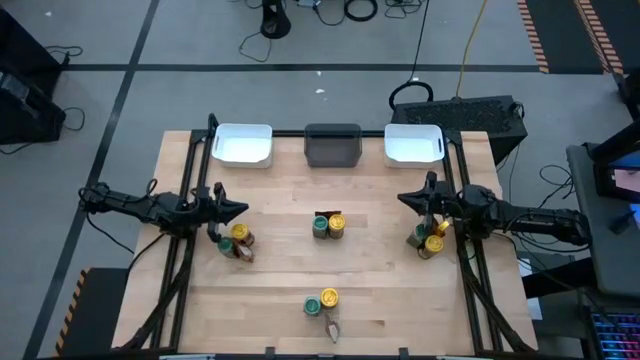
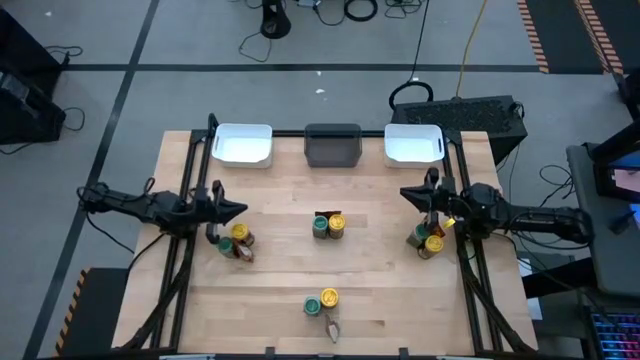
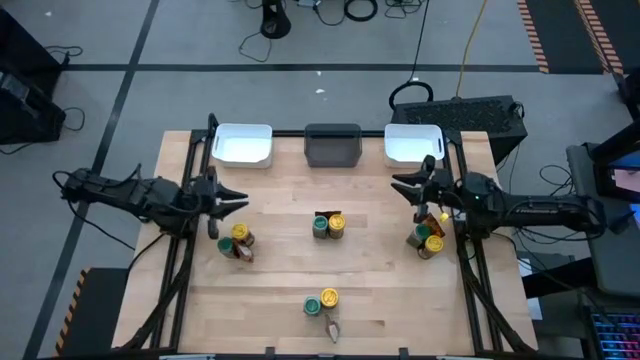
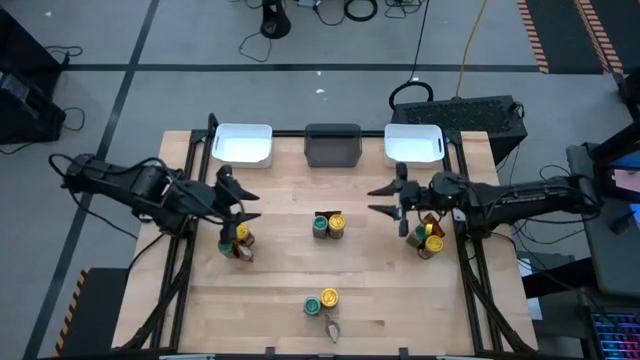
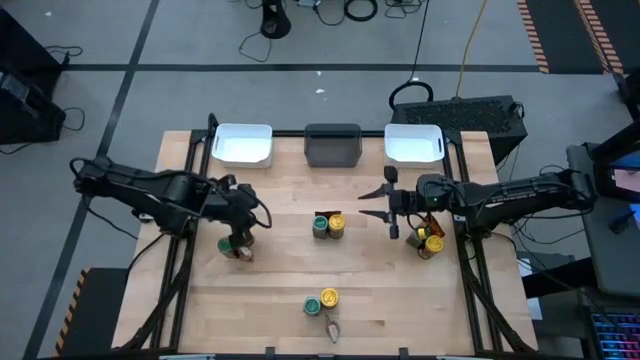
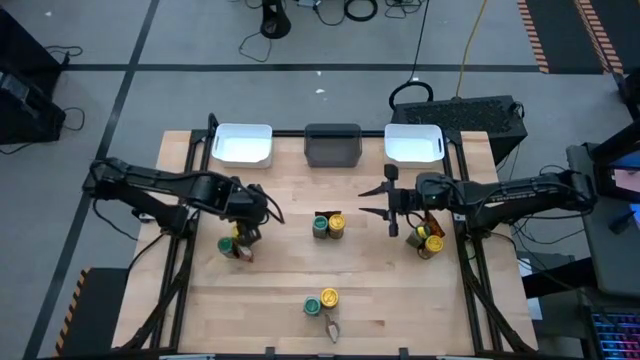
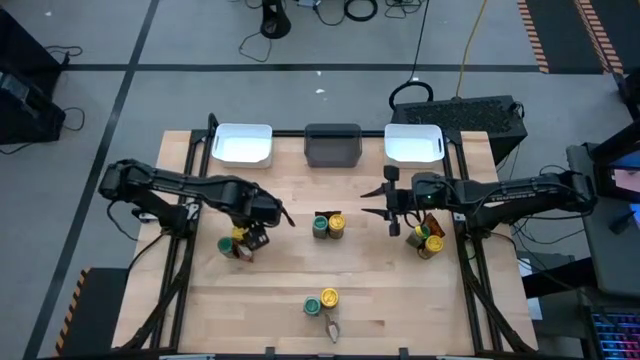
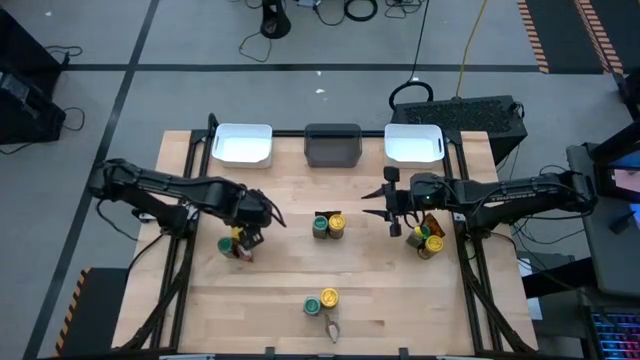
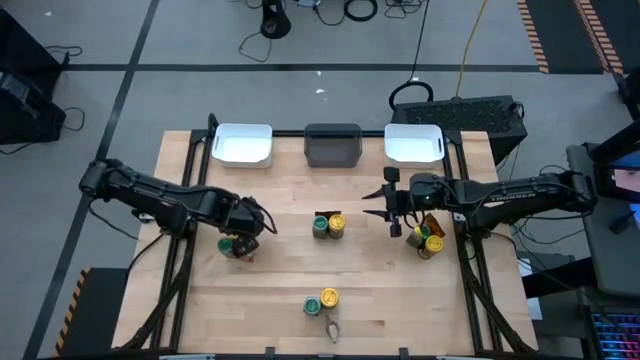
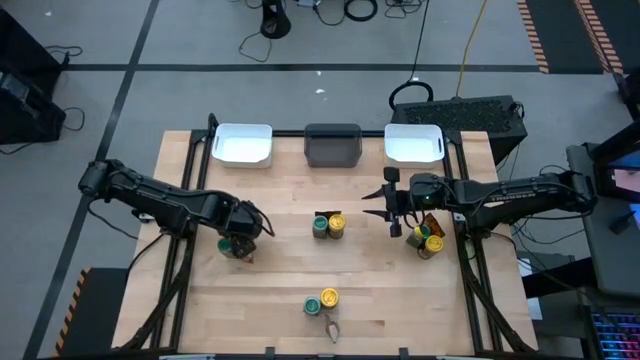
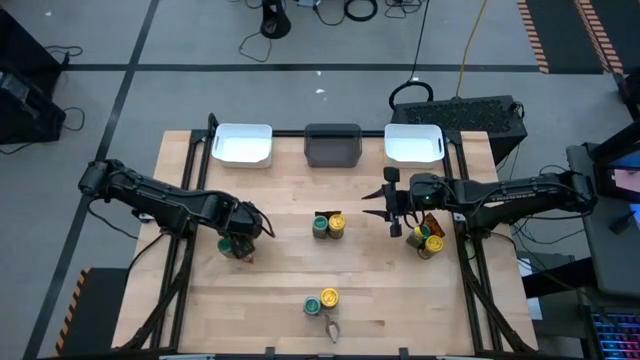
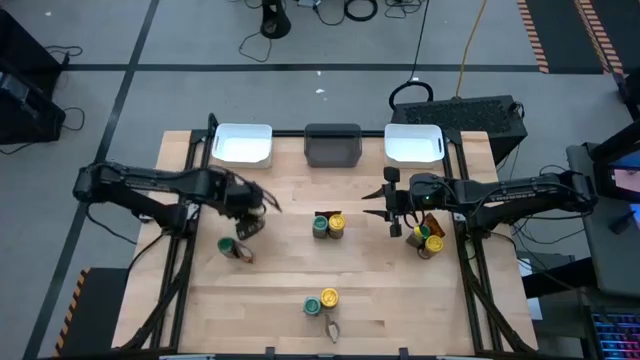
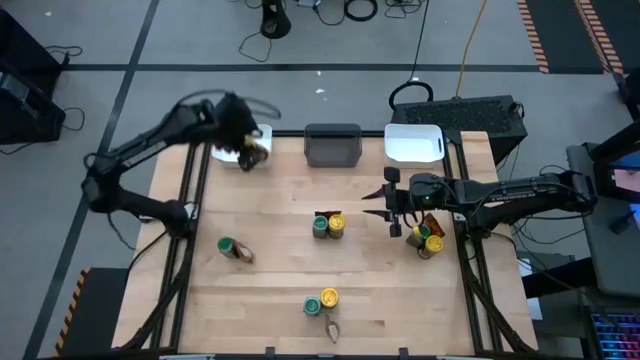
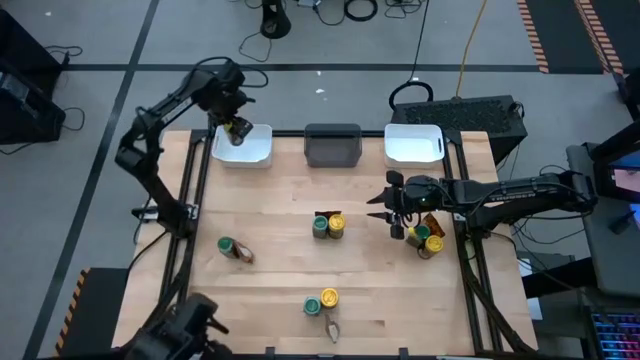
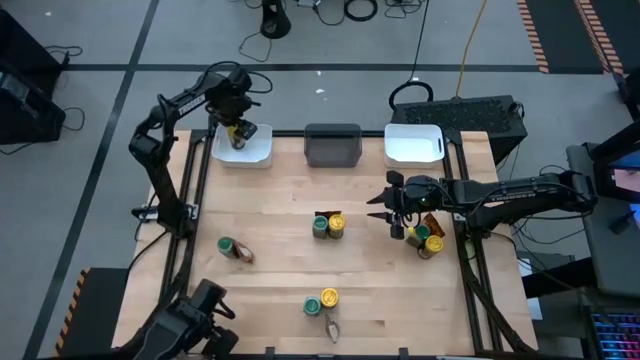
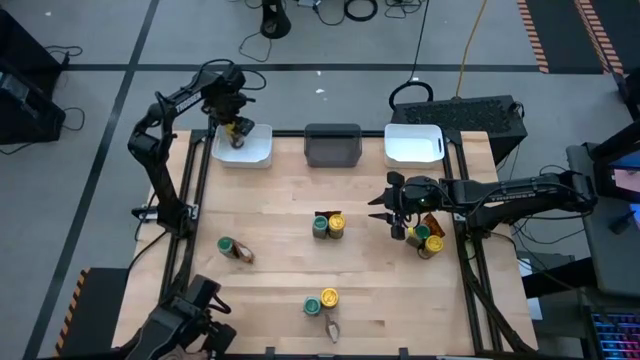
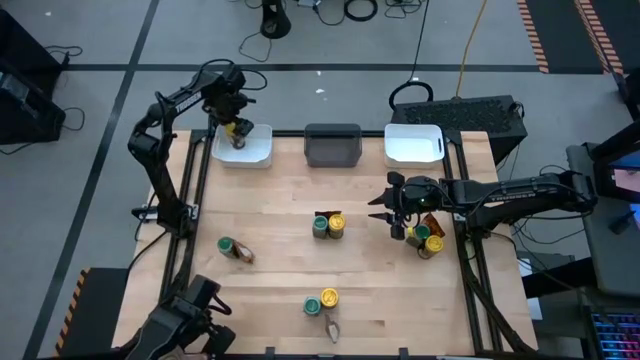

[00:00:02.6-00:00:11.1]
Task: Sort spices by type
Put the top left yellow seasoning bottle into the left white bin

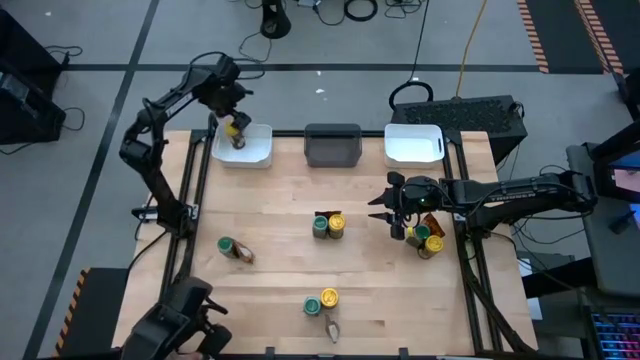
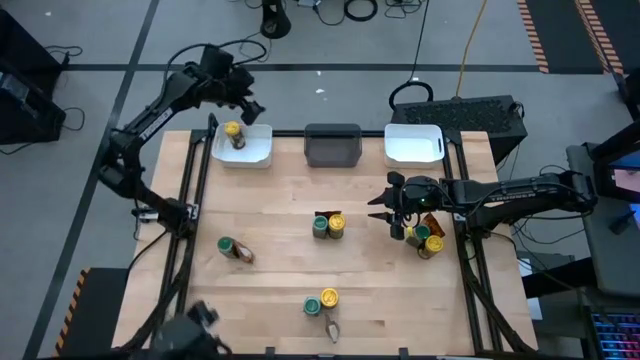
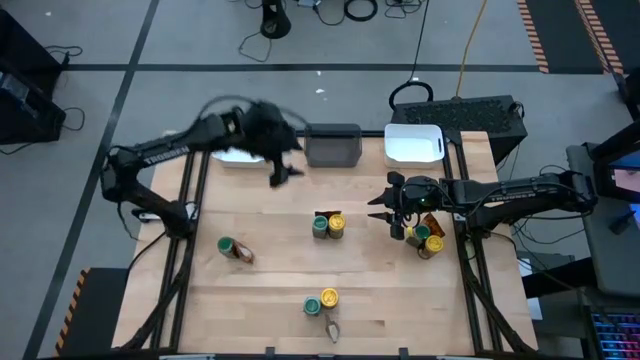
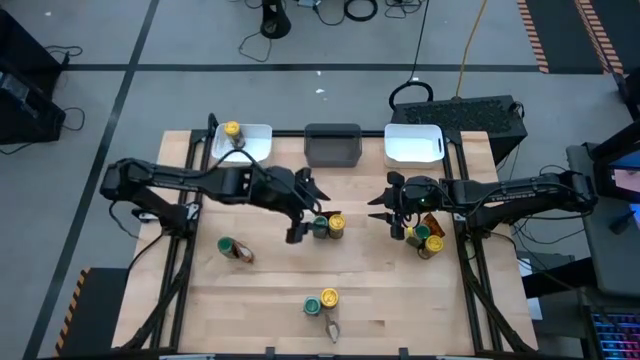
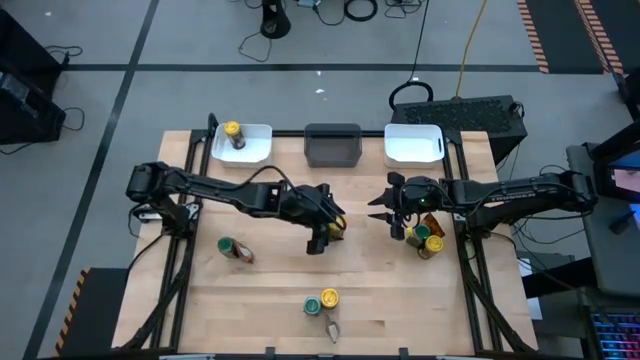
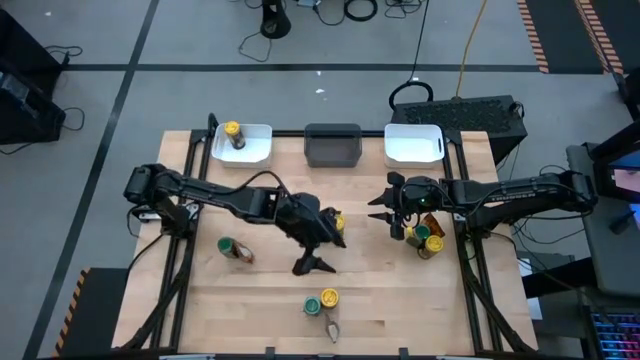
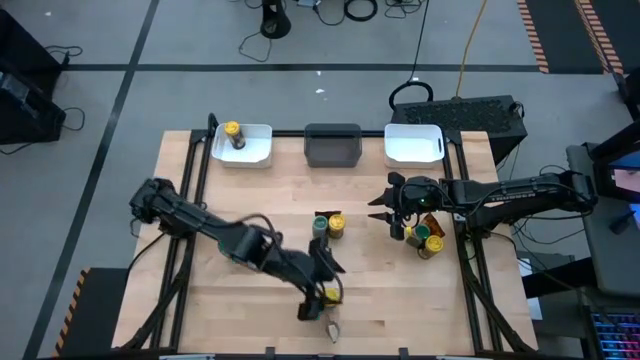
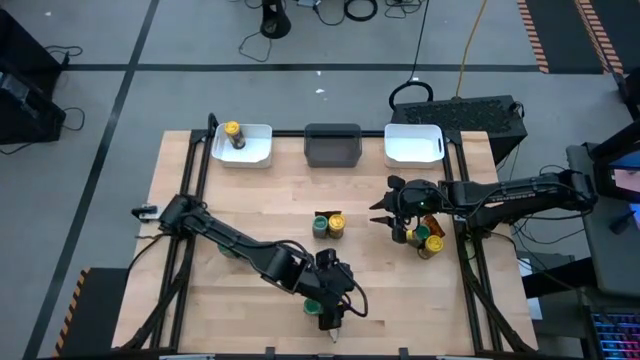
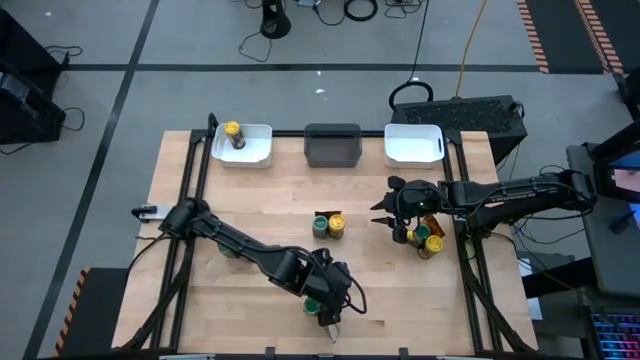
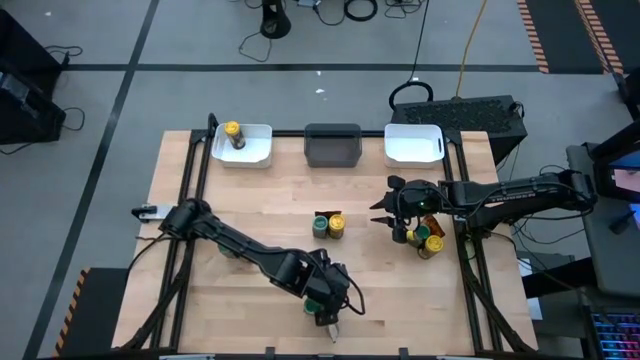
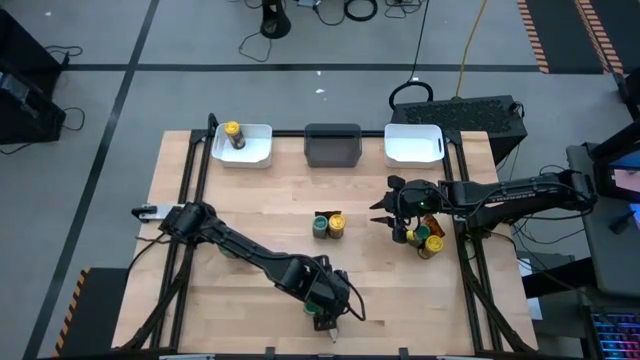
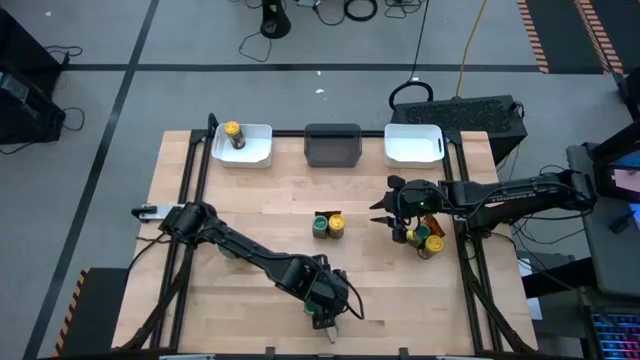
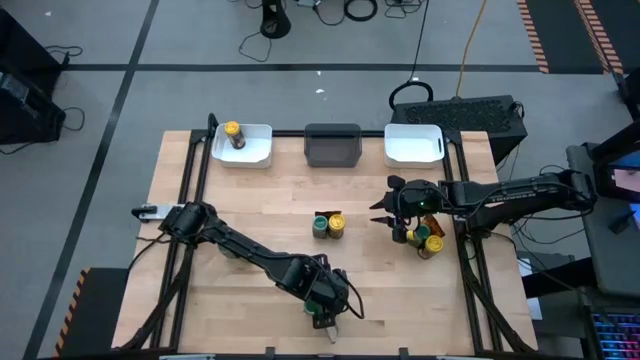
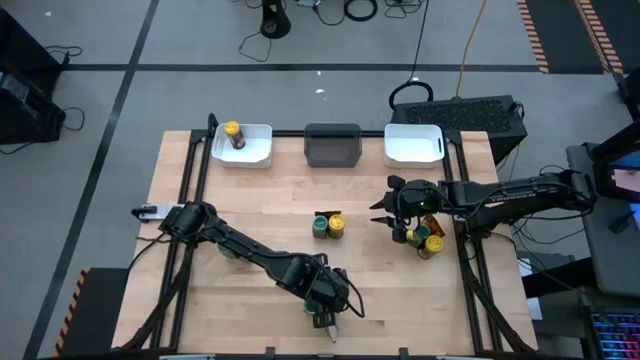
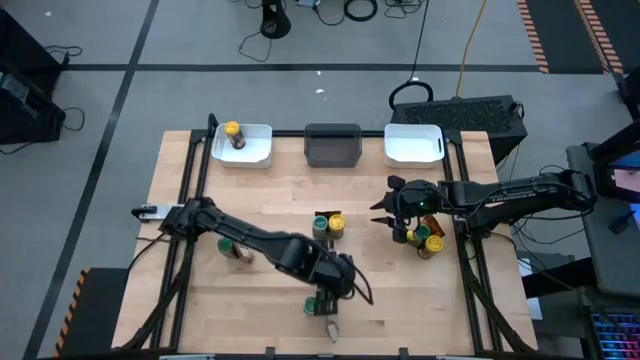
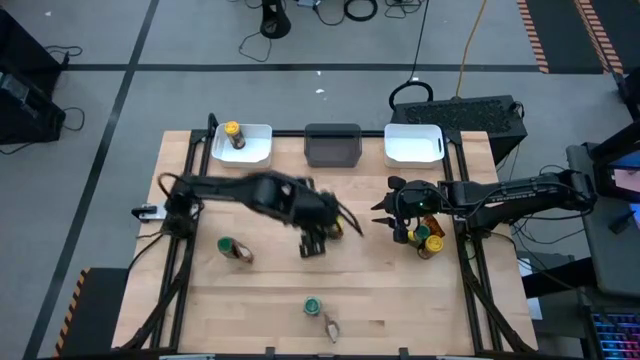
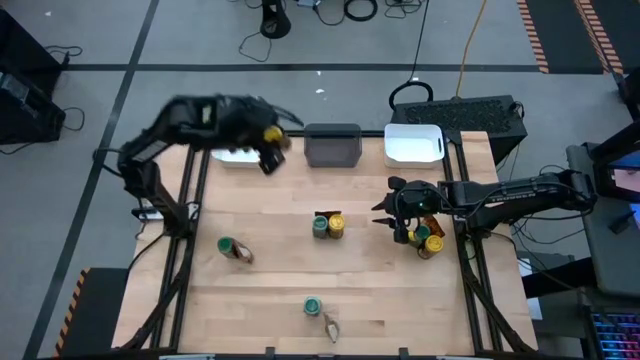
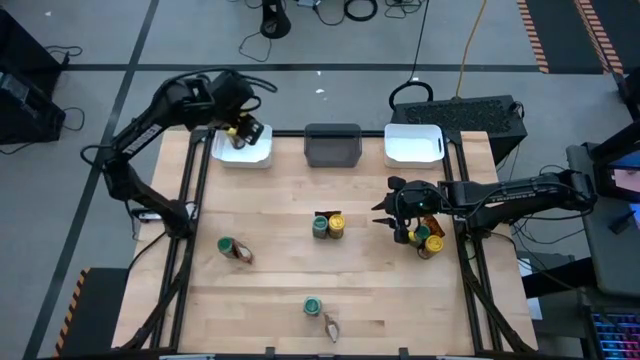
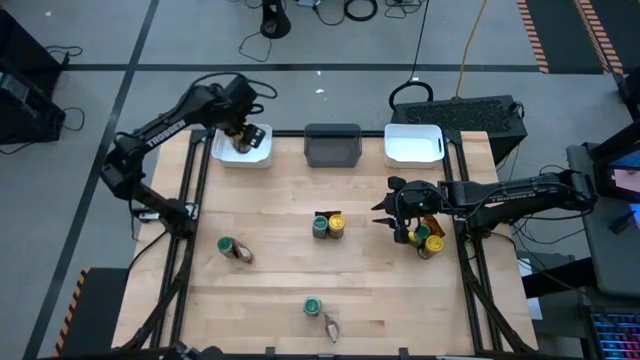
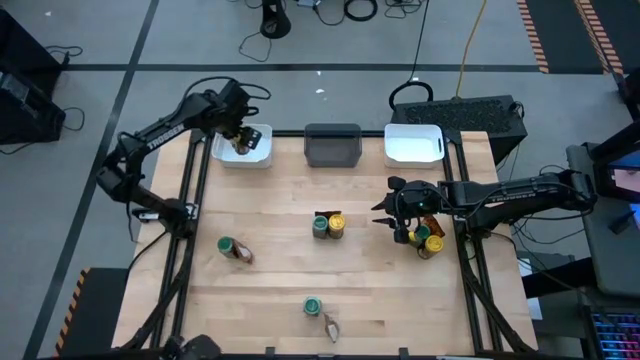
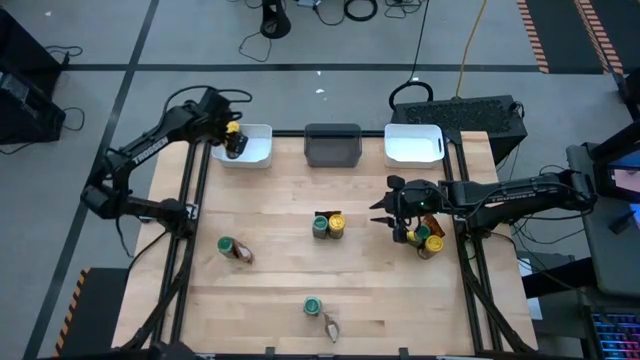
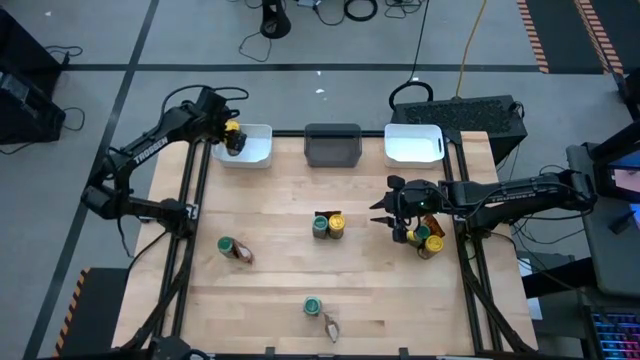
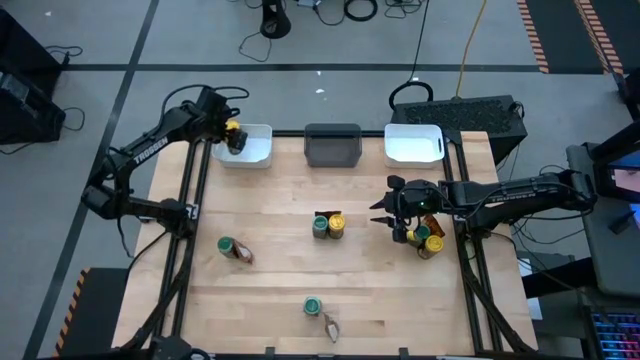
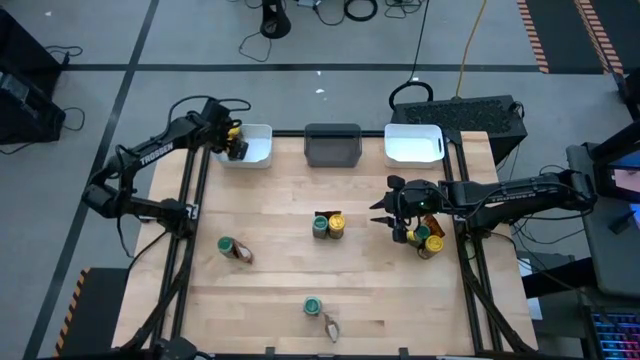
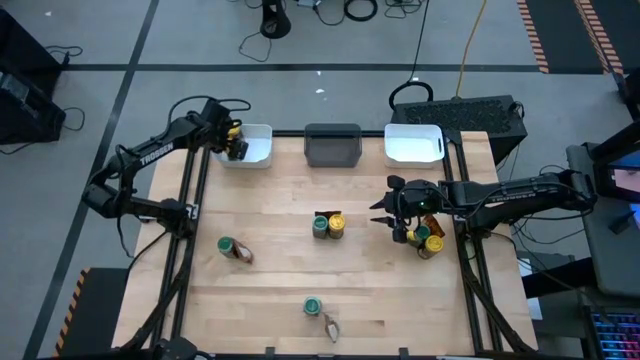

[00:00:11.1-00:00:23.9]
Put the bottom yellow seasoning bottle into the left white bin

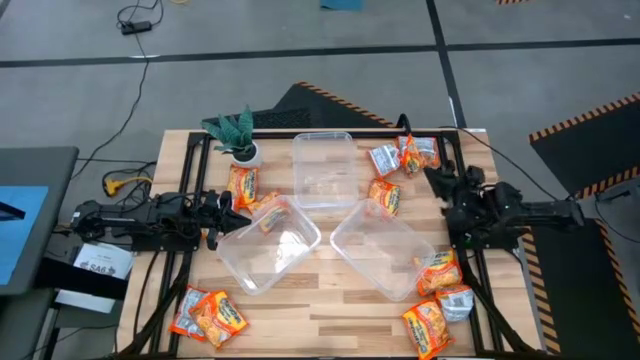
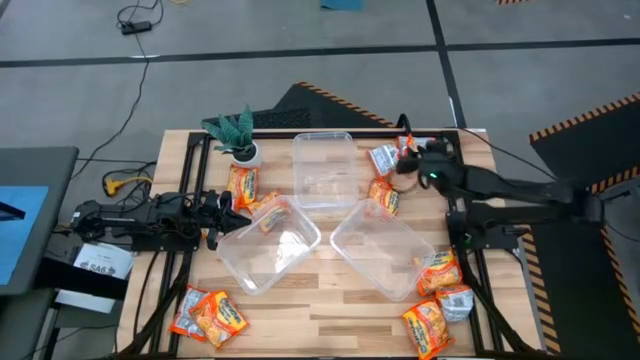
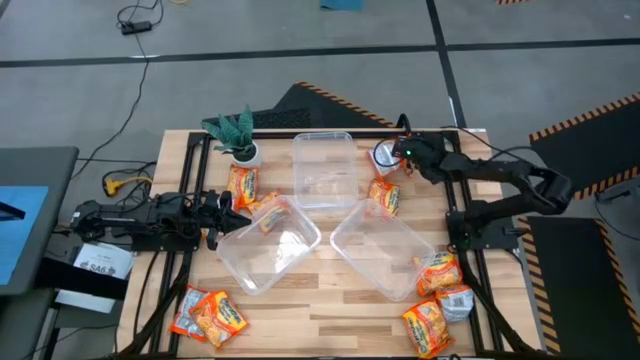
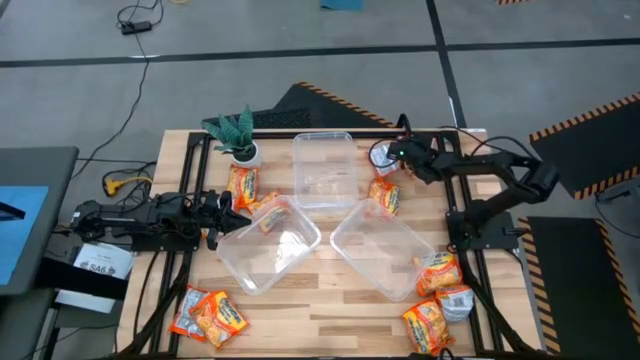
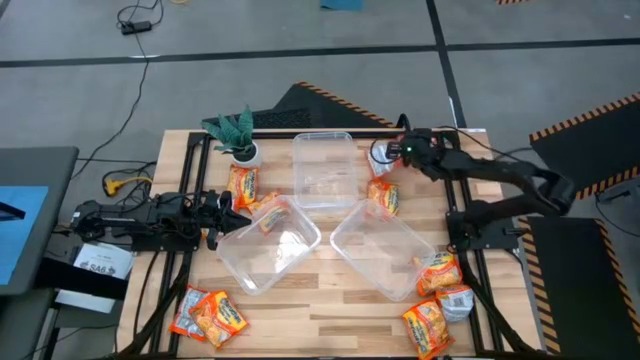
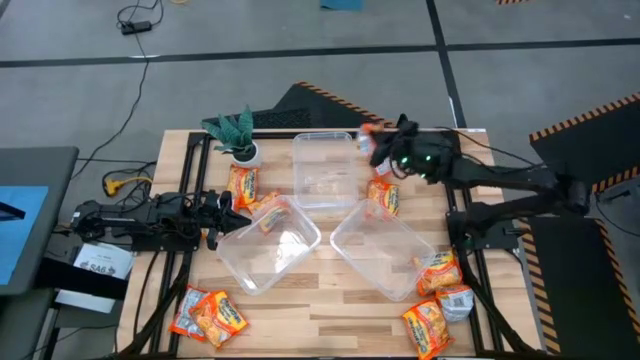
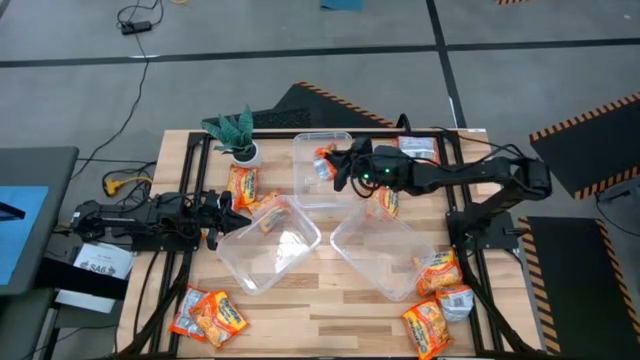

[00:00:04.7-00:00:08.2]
Task: Sort Maruchan noodles
Put the orange noodle pack into the top transparent container
